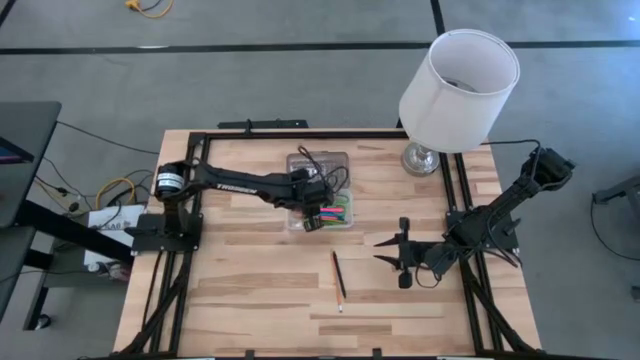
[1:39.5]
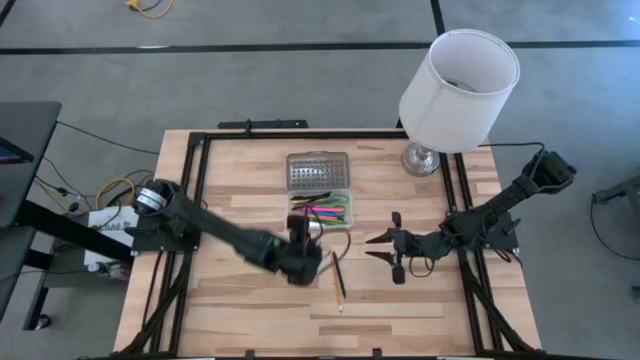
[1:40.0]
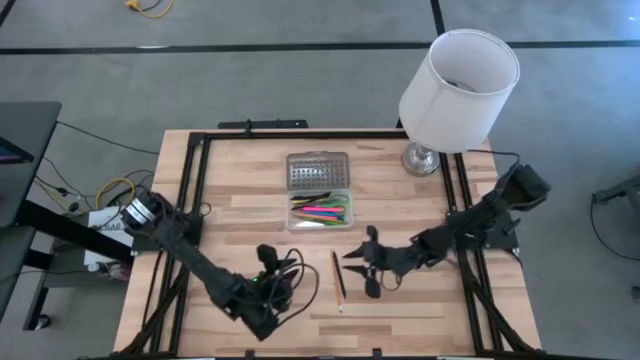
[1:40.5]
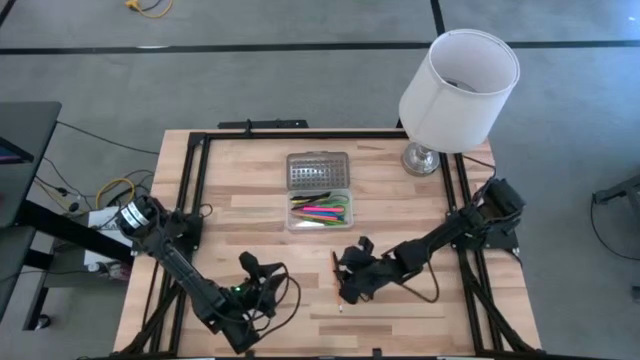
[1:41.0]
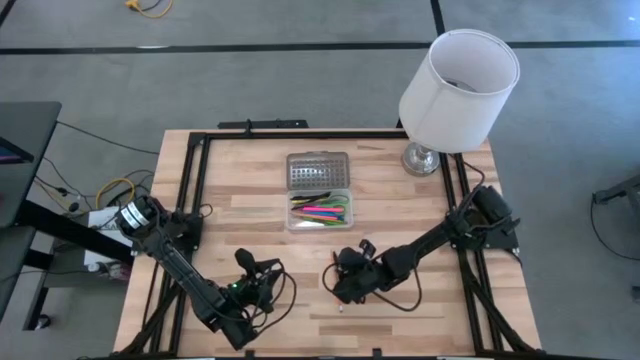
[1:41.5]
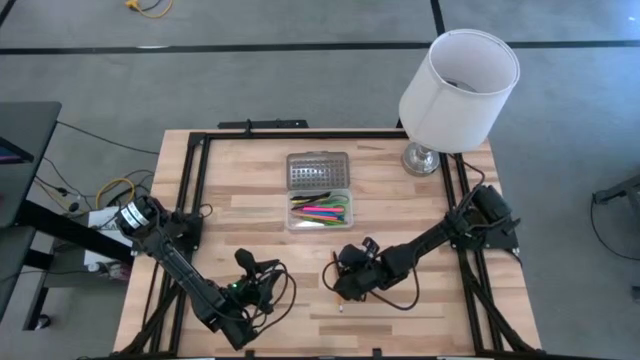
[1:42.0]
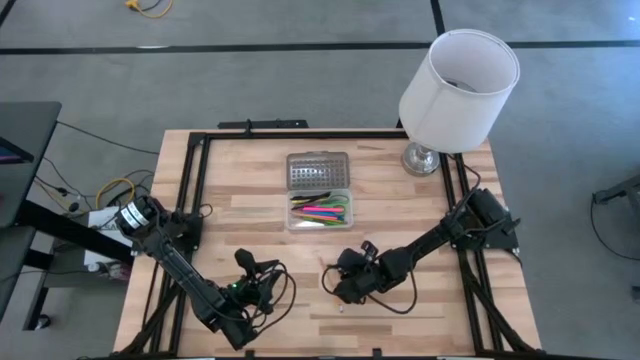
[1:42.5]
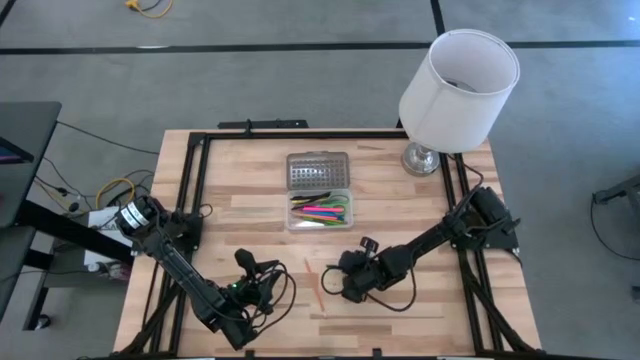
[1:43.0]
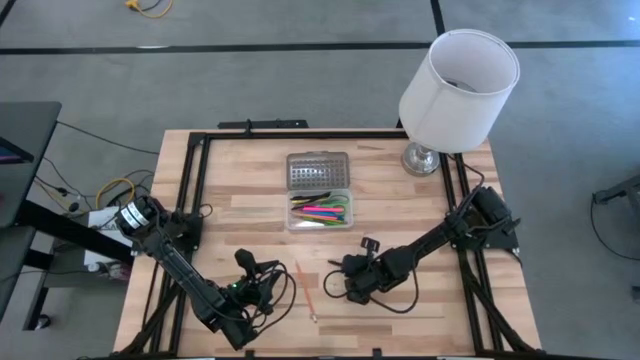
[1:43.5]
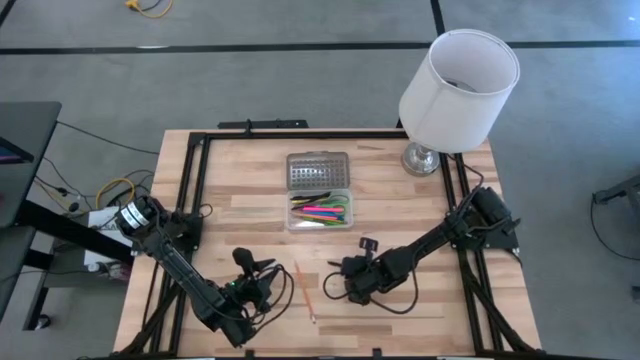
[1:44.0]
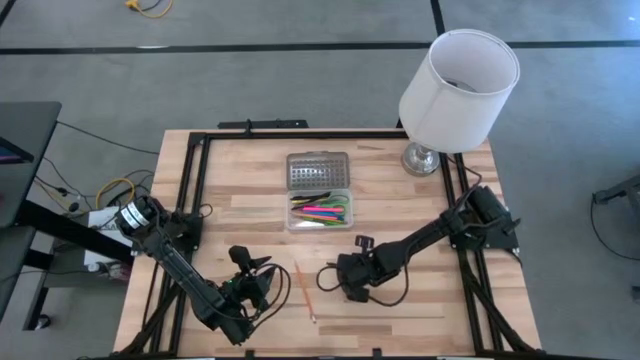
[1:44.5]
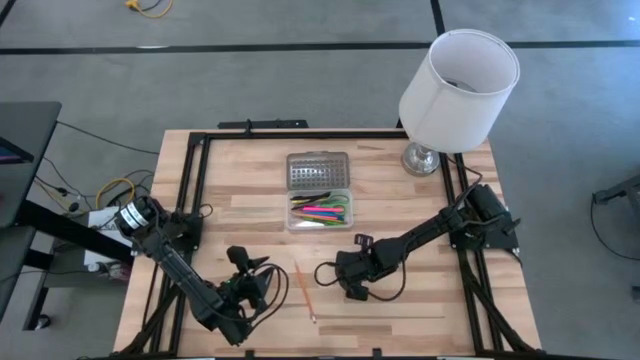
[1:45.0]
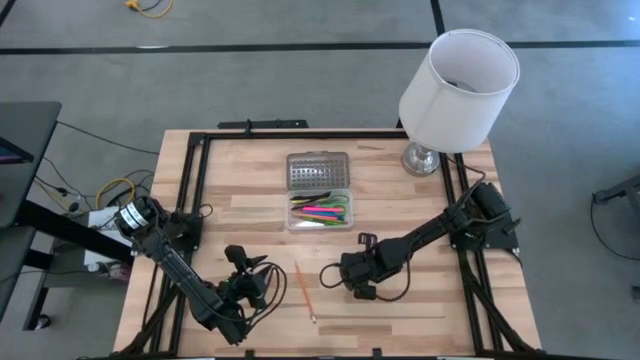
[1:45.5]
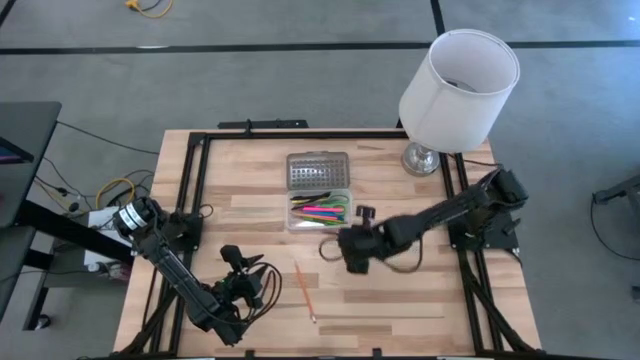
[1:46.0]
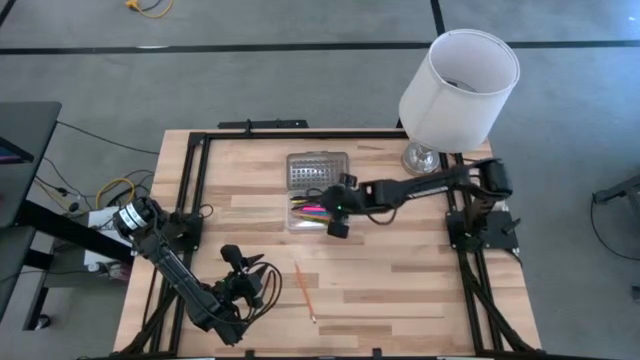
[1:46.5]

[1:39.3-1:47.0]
Task: Pick & place school supplies into a supply box
Put the black pen into the black supply box

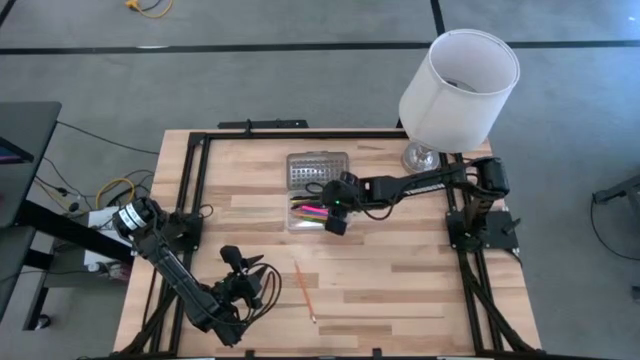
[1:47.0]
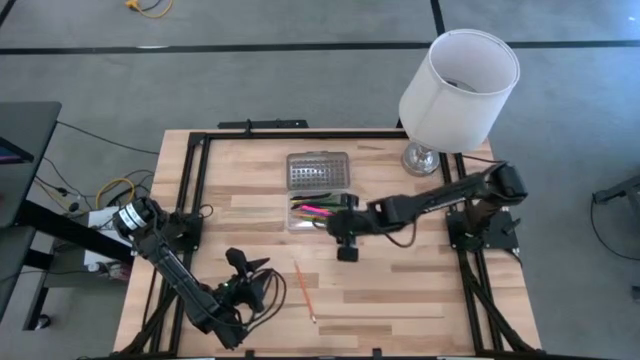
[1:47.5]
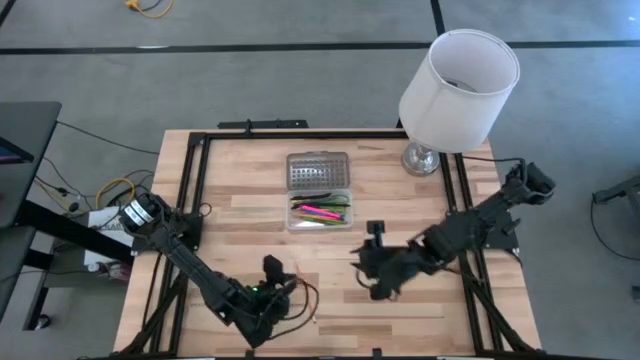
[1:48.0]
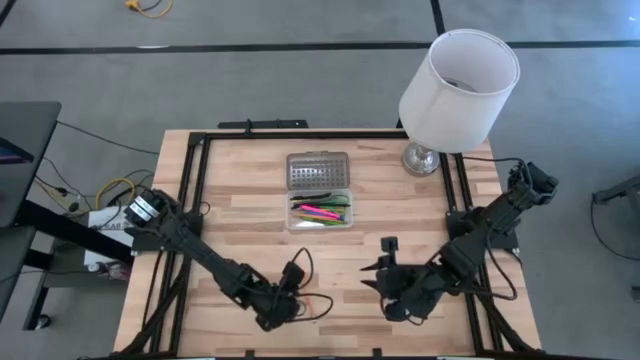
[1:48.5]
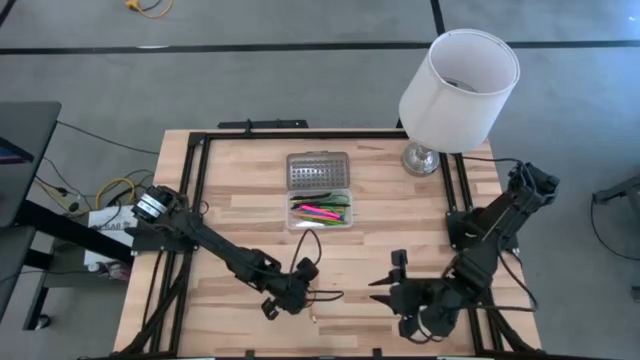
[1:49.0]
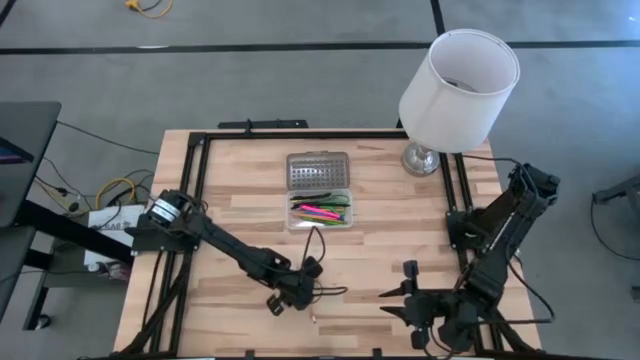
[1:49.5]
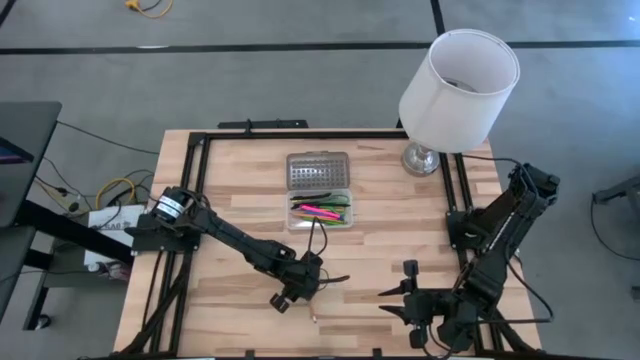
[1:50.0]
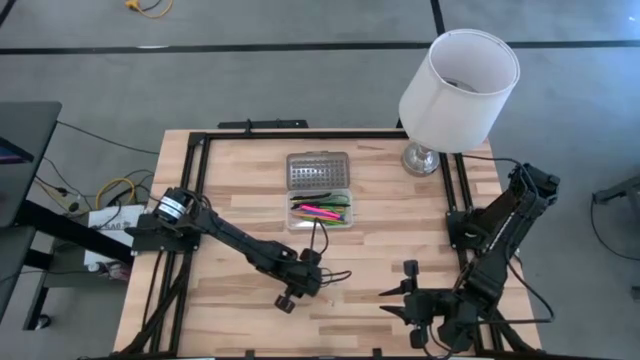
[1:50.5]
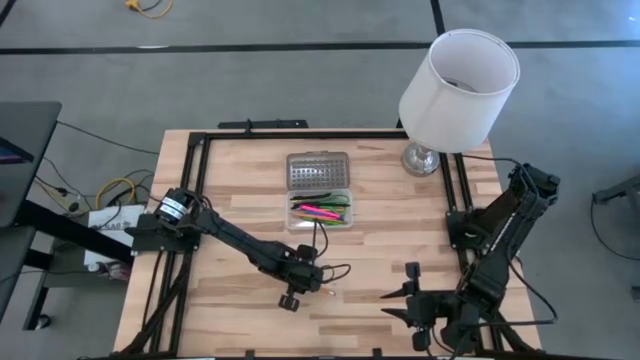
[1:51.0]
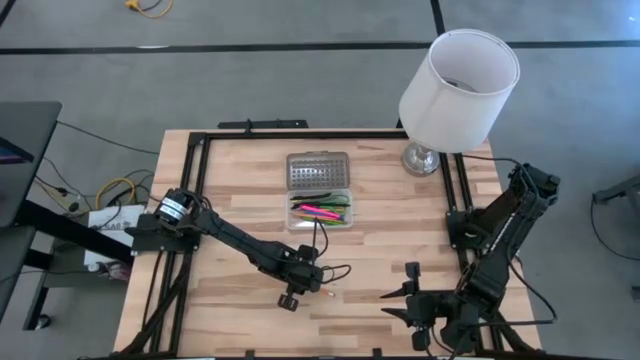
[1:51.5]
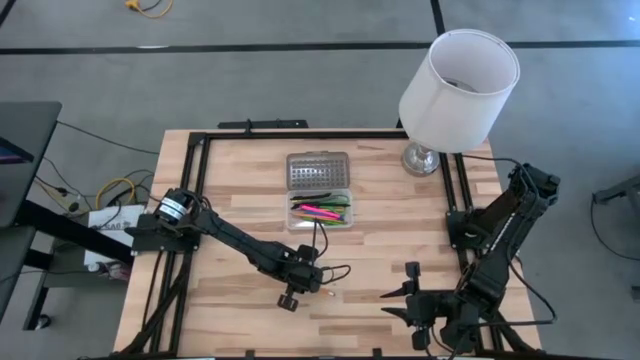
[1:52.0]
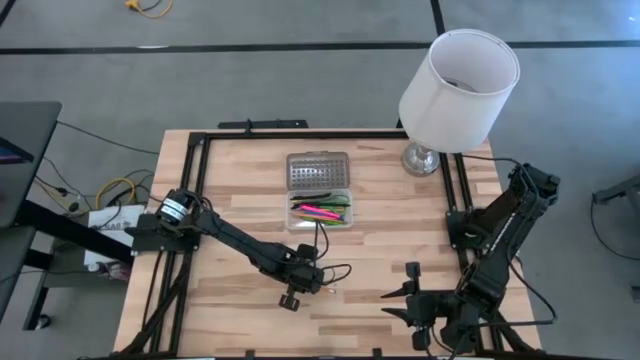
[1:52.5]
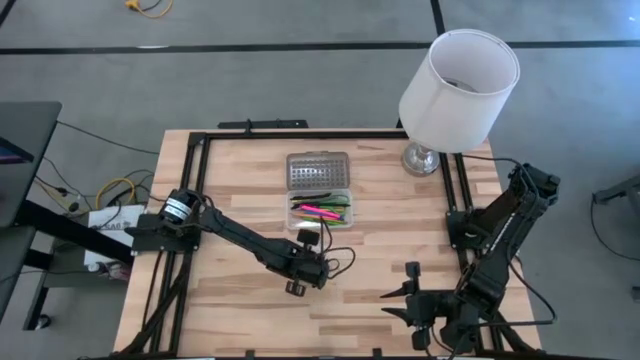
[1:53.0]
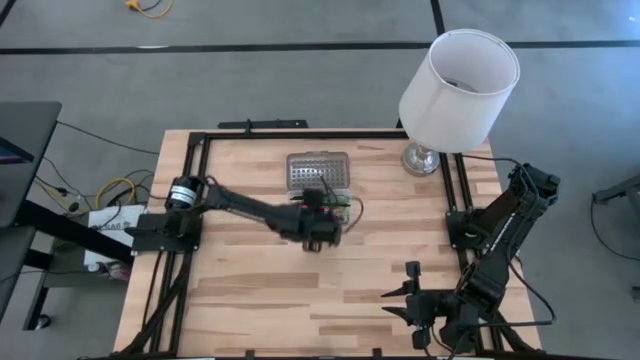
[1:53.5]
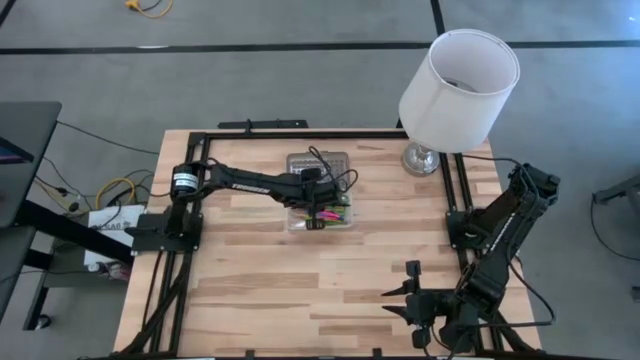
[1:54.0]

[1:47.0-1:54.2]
Put the yellow pencil into the black supply box

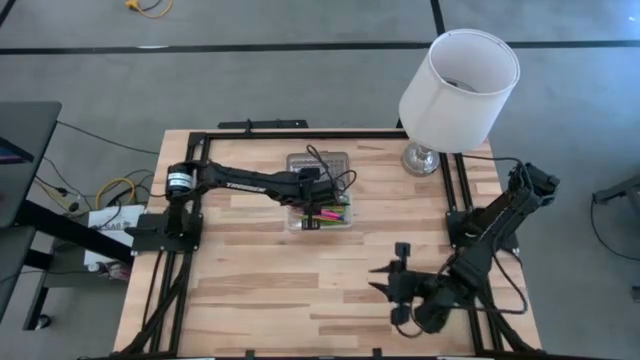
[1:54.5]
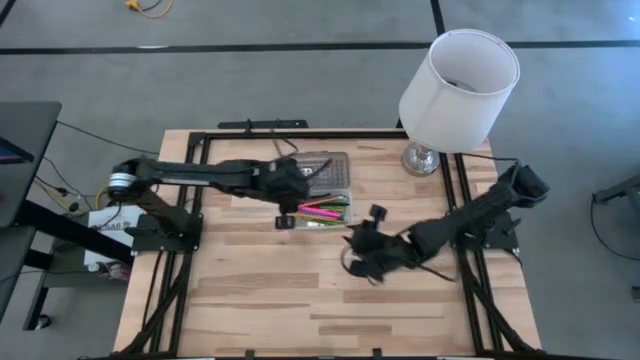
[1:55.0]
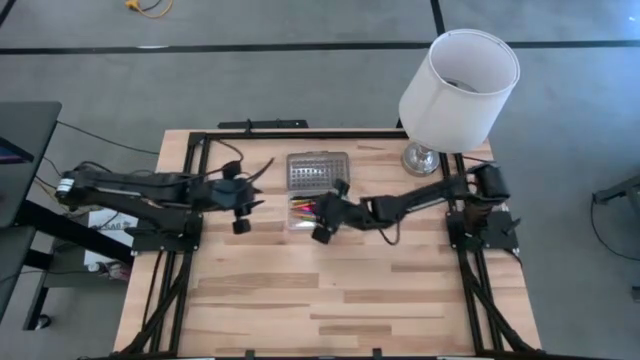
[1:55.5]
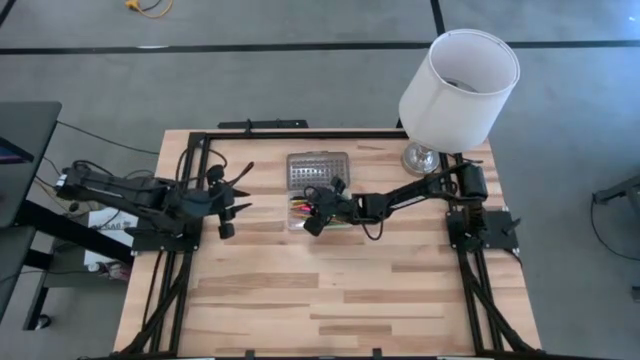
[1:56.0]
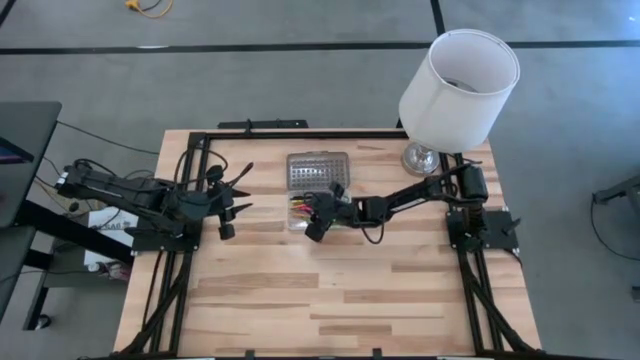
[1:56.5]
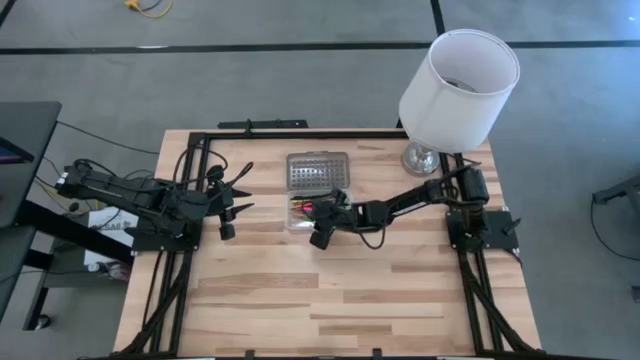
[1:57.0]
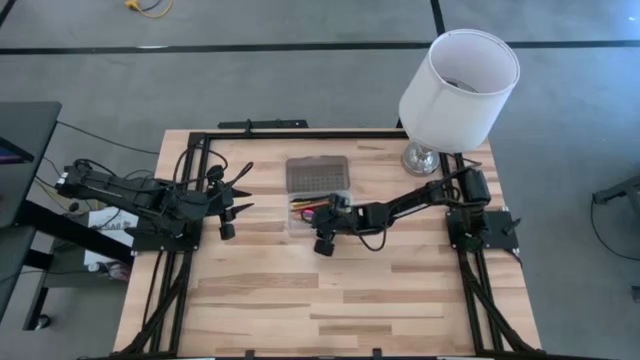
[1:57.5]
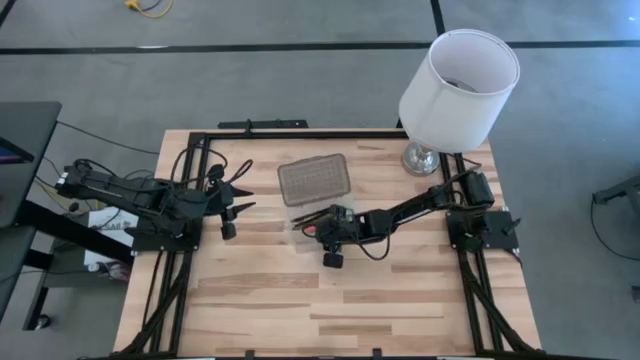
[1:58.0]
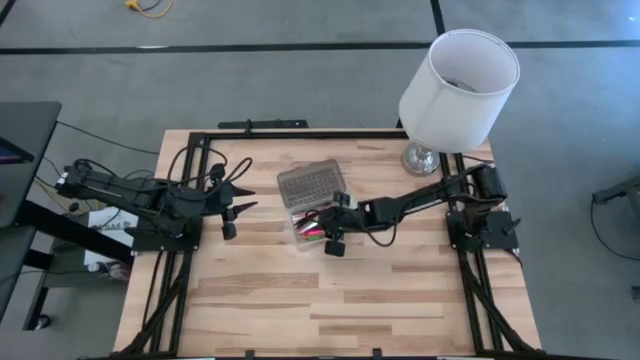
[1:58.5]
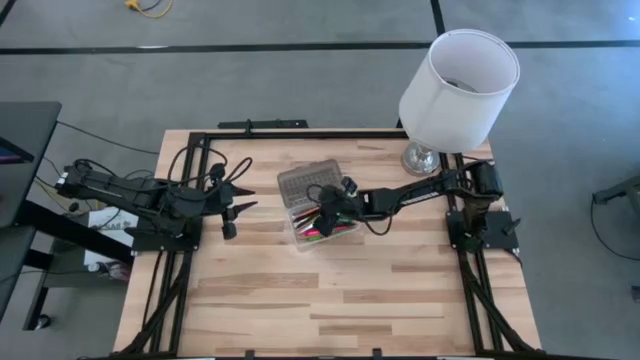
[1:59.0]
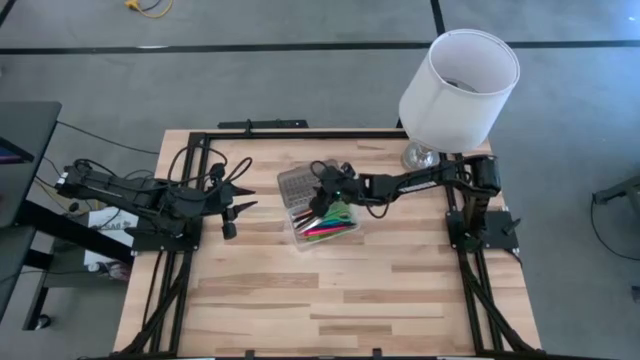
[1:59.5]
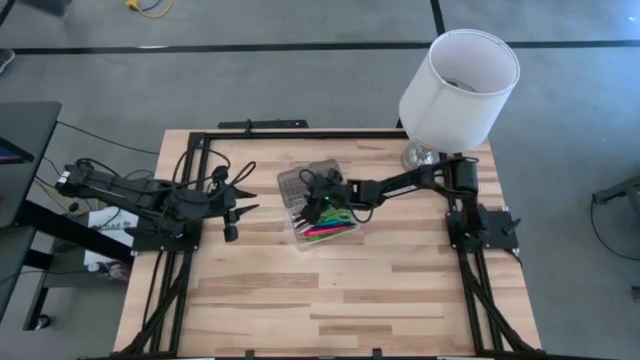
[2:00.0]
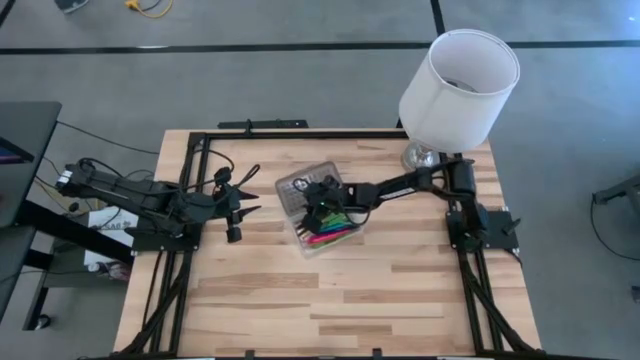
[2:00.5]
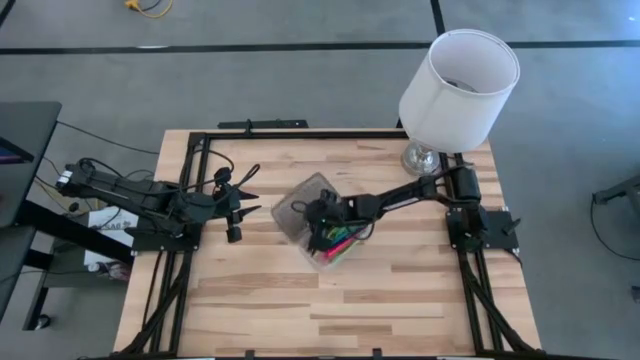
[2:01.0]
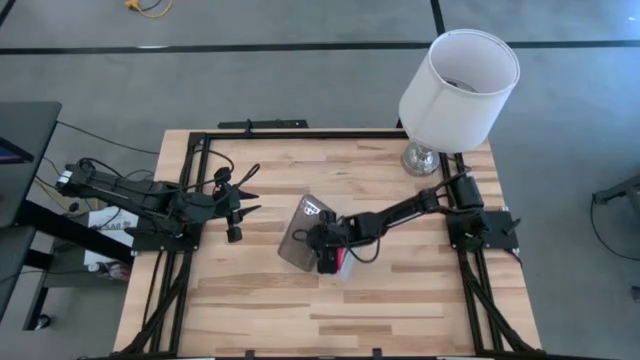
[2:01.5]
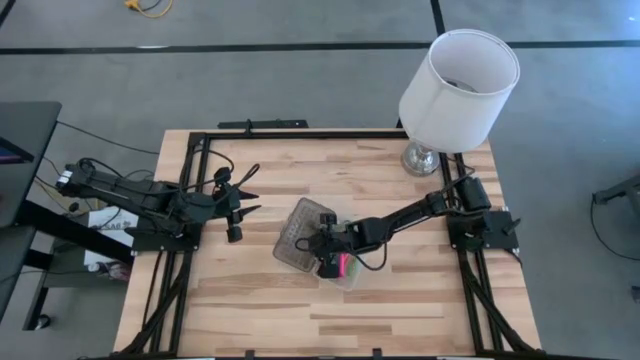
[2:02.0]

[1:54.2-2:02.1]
Adjust the black supply box
